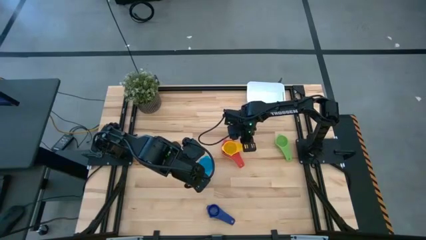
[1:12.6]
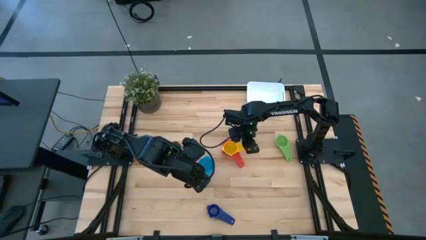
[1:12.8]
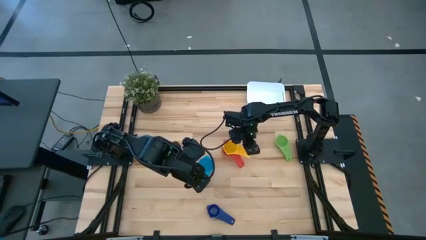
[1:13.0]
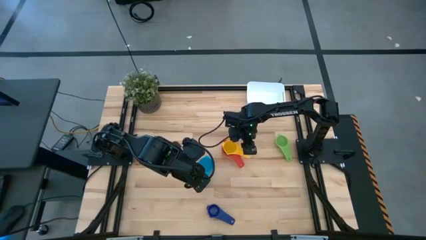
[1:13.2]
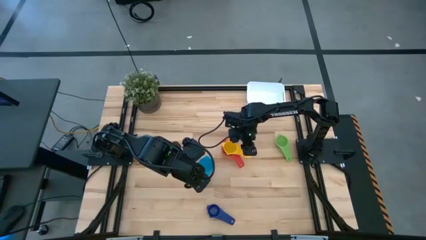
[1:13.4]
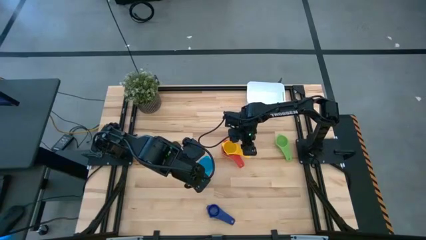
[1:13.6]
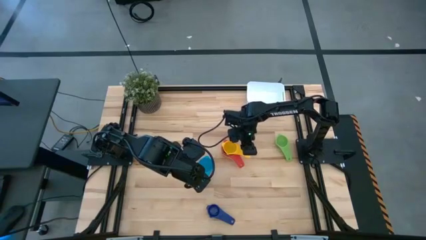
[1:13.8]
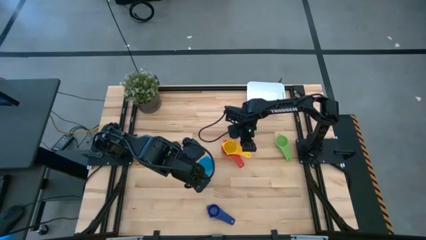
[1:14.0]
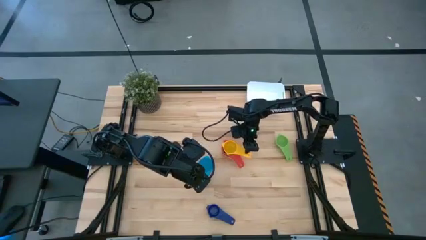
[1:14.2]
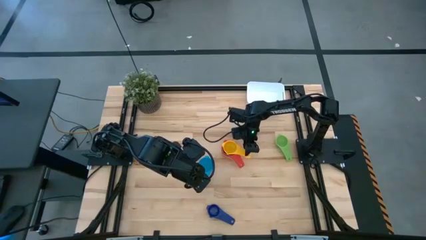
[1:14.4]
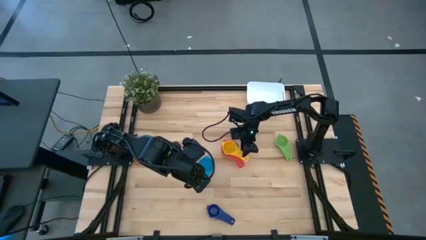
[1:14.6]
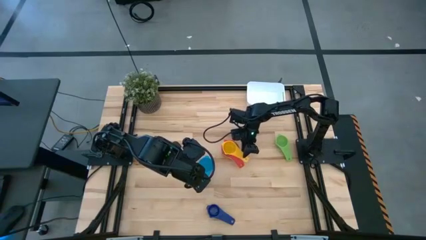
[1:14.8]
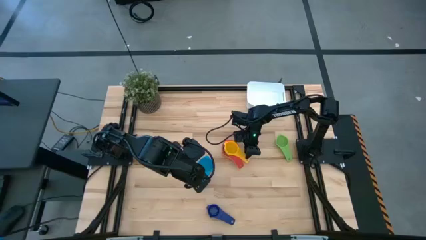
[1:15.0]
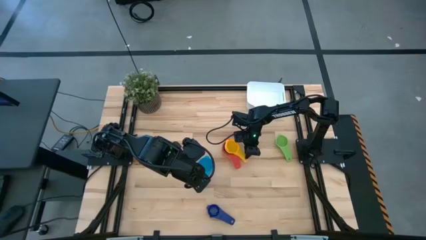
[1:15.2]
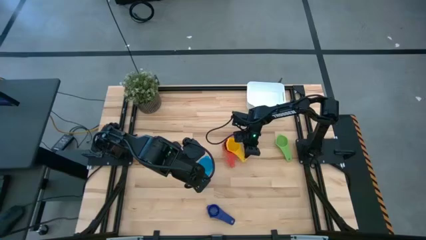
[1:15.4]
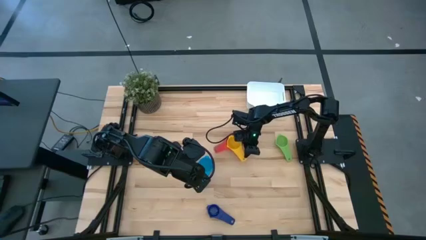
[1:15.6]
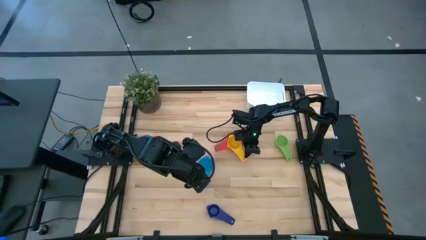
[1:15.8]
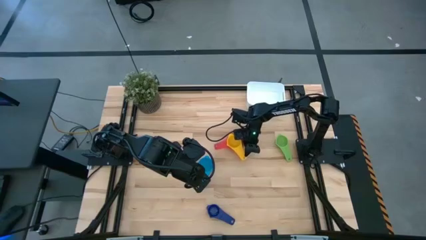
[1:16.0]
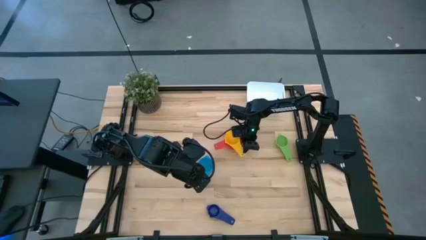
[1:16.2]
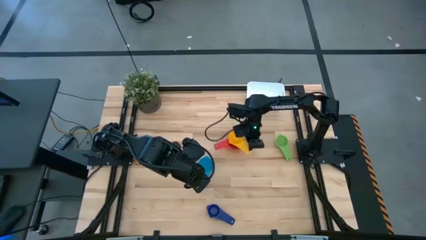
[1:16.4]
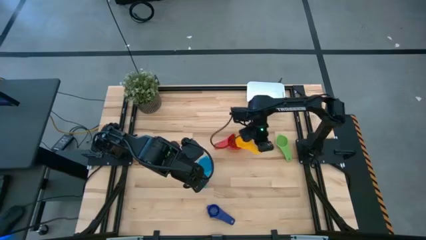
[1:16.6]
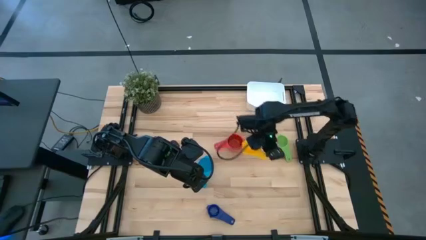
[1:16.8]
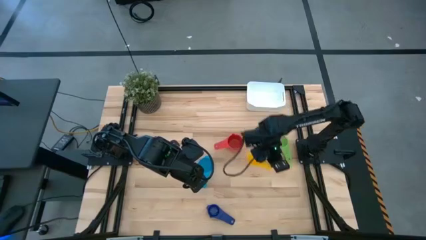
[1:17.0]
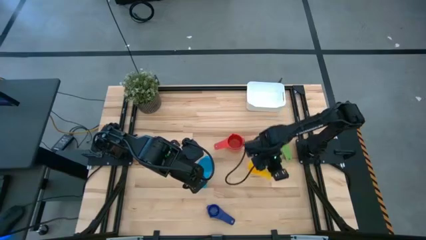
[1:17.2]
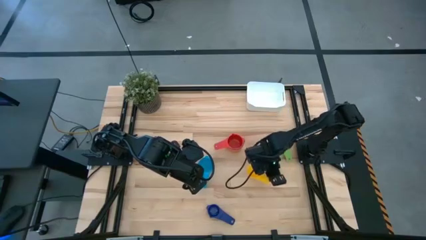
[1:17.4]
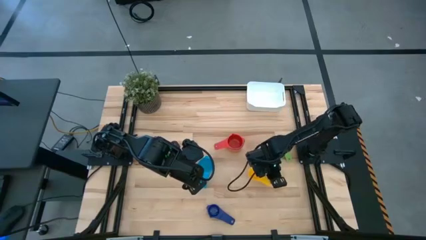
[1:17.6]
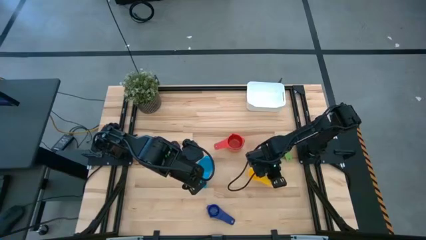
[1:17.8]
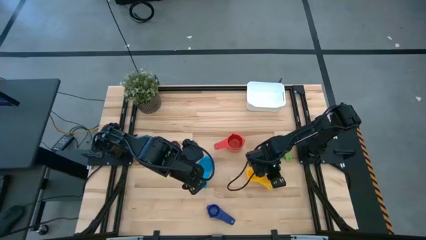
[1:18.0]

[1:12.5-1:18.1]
Task: Nest measuring cups in basket
Remove the yellow measuring cup from the red measuring cup

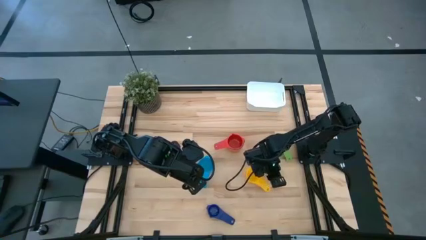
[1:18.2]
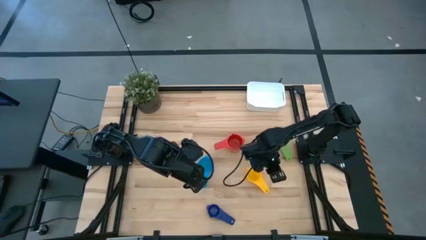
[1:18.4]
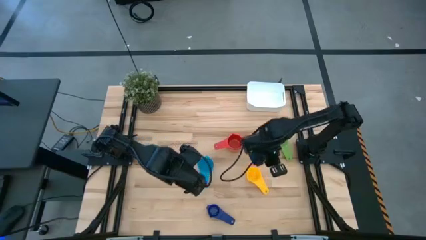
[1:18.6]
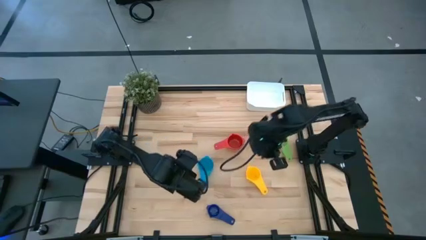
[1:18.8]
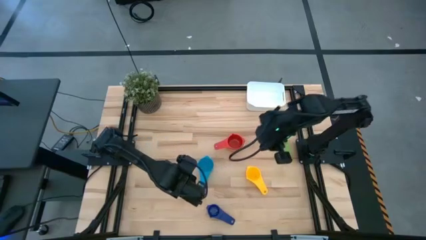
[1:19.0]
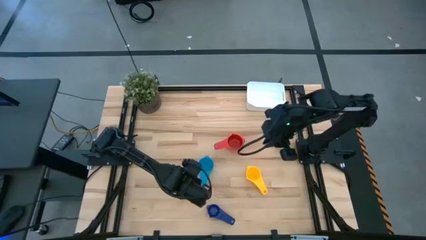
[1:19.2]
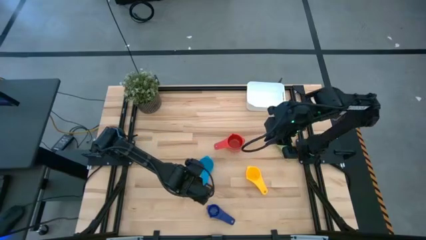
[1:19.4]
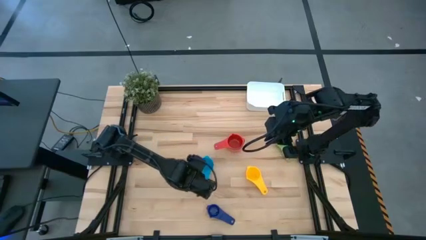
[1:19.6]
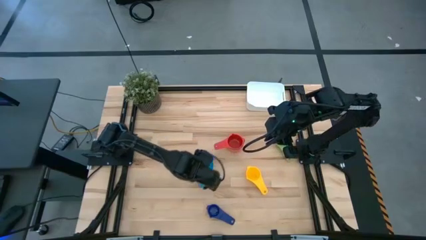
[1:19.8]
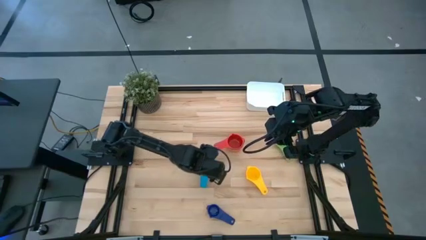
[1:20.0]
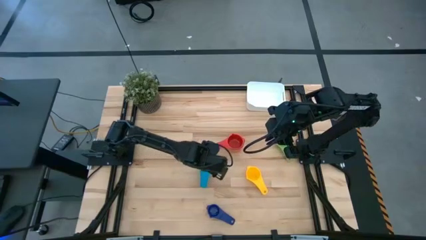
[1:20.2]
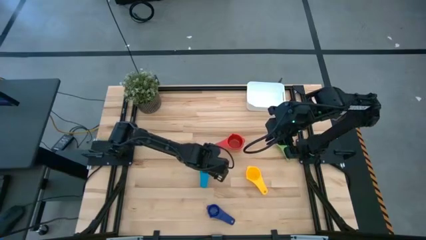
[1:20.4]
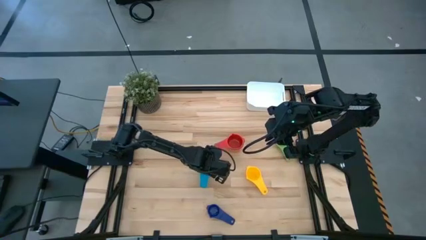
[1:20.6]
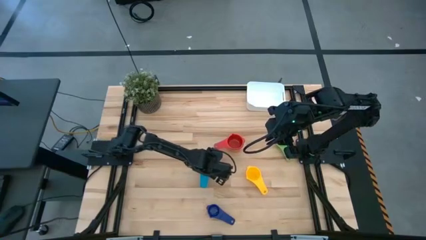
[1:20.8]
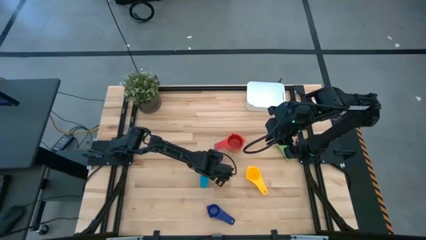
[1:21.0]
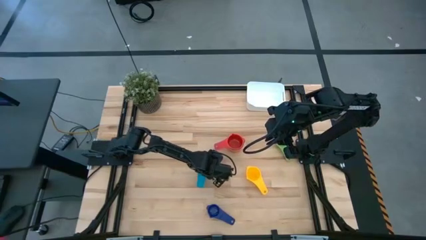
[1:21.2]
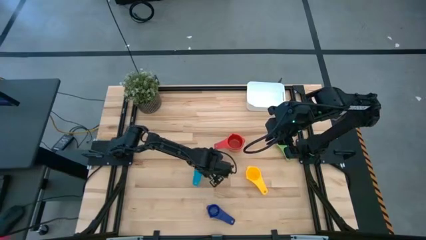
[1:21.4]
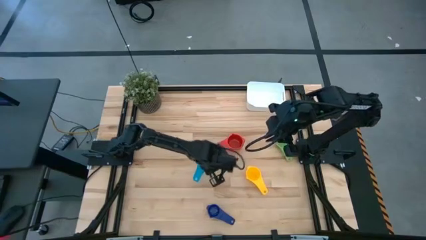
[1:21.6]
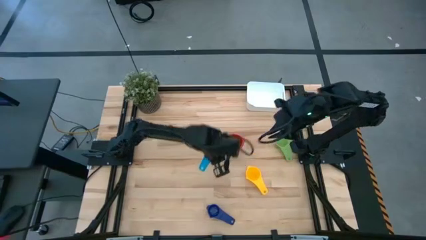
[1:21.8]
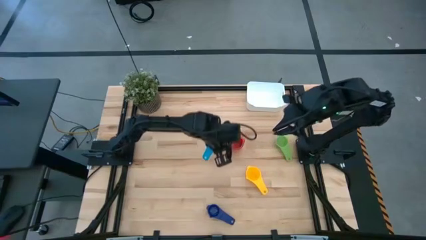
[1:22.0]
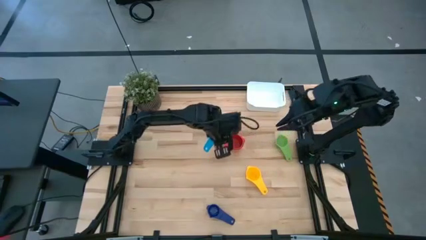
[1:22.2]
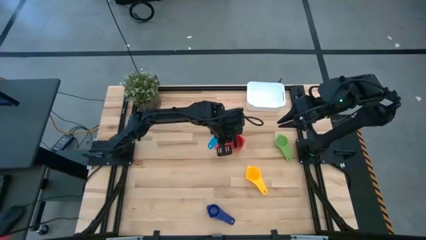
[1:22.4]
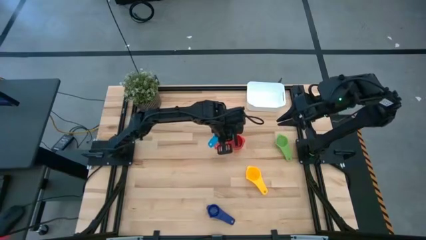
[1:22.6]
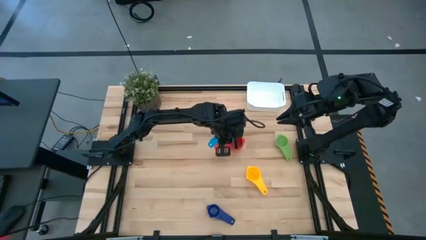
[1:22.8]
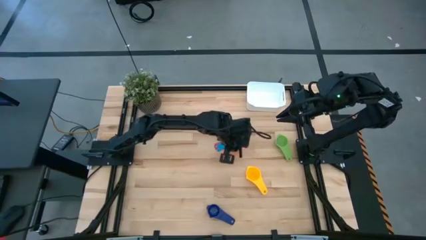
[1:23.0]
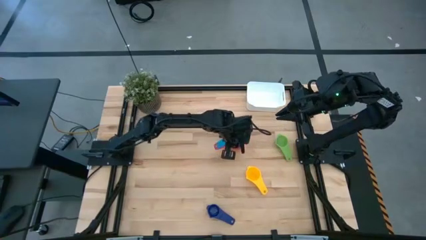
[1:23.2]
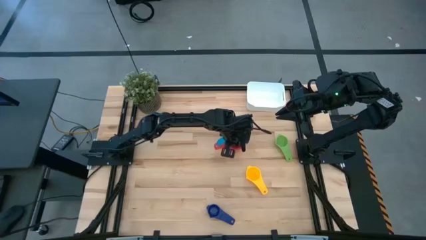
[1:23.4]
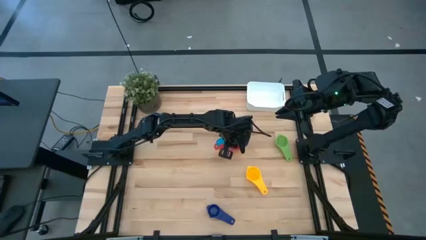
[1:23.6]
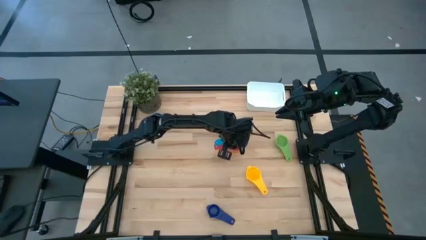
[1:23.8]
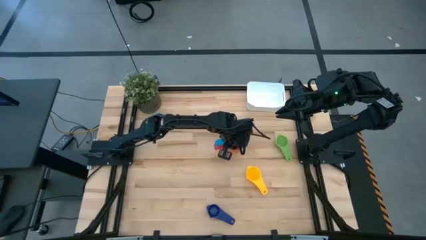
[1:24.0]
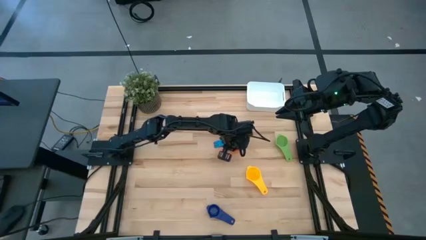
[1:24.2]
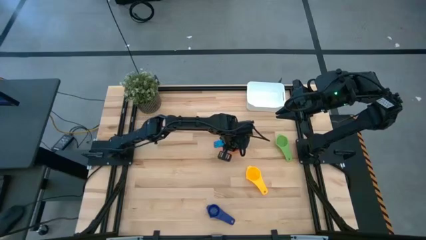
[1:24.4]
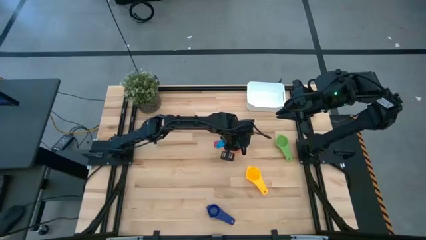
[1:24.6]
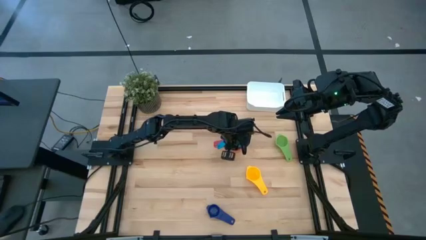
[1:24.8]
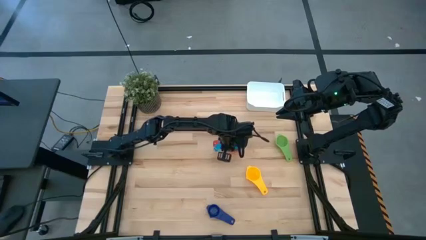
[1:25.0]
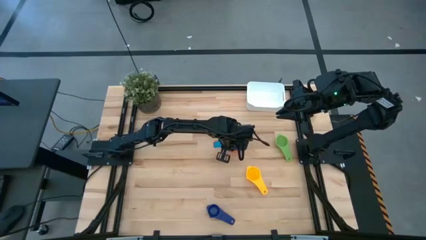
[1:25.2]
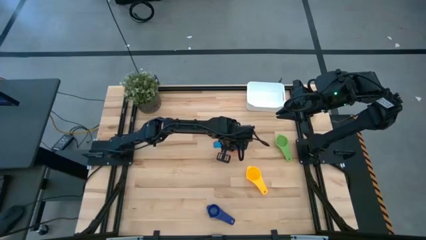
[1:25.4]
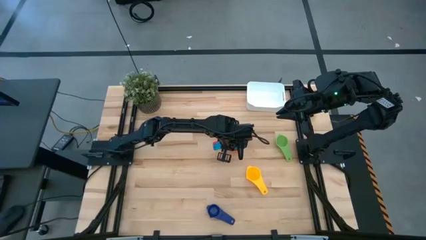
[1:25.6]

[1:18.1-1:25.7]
Stack the light blue measuring cup on top of the red measuring cup
